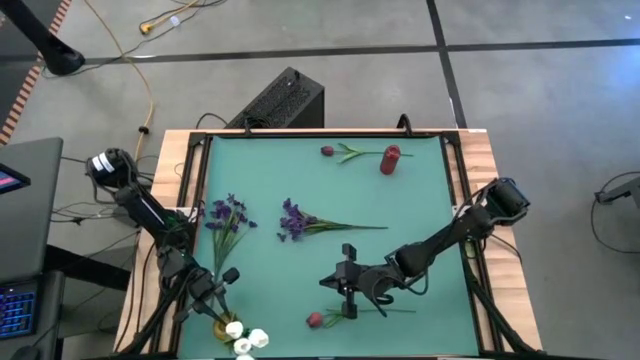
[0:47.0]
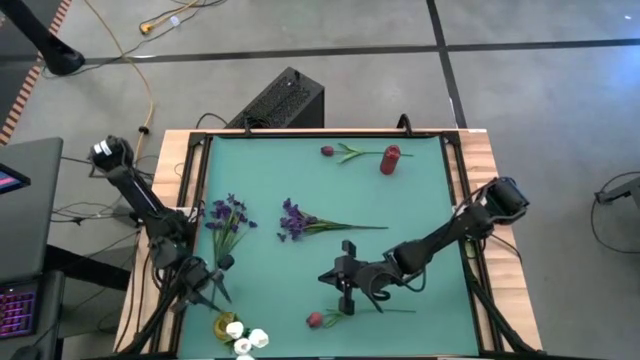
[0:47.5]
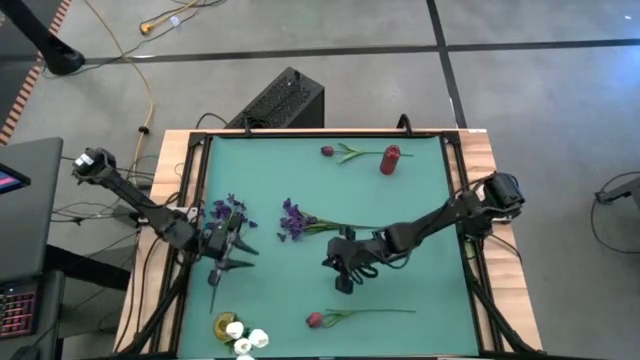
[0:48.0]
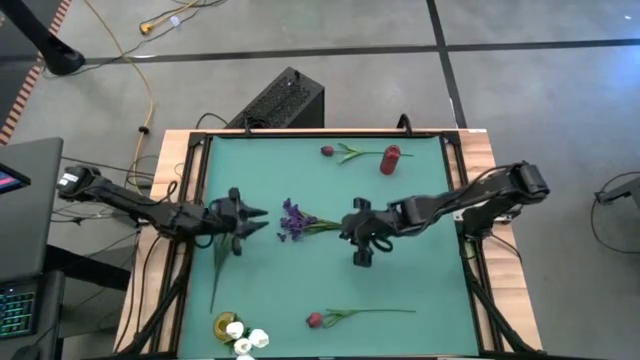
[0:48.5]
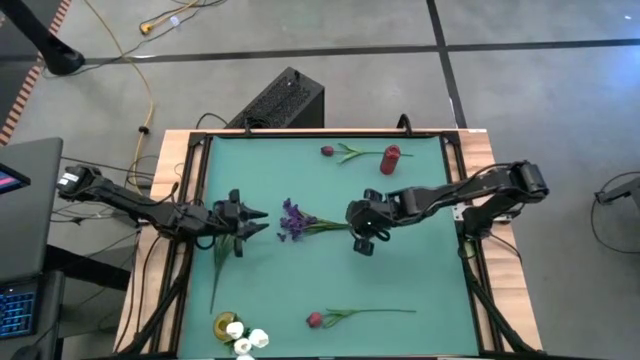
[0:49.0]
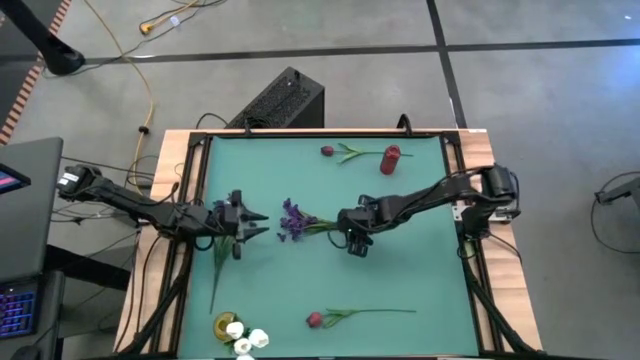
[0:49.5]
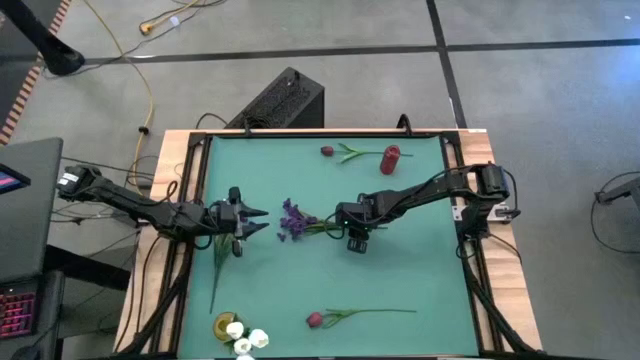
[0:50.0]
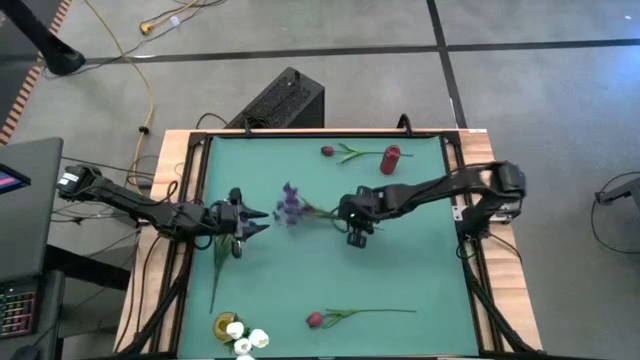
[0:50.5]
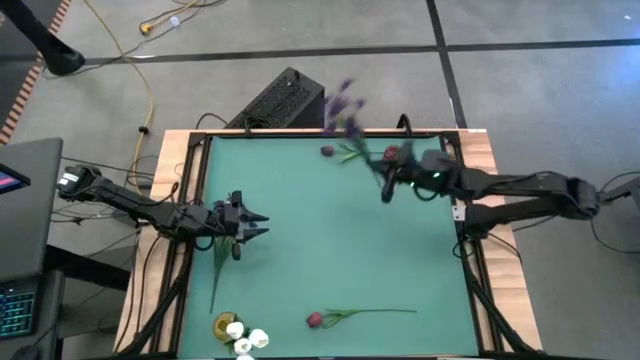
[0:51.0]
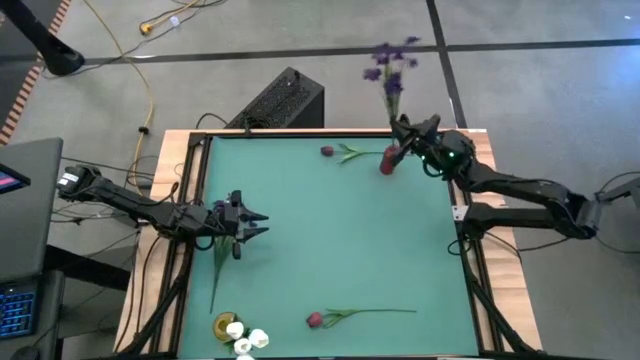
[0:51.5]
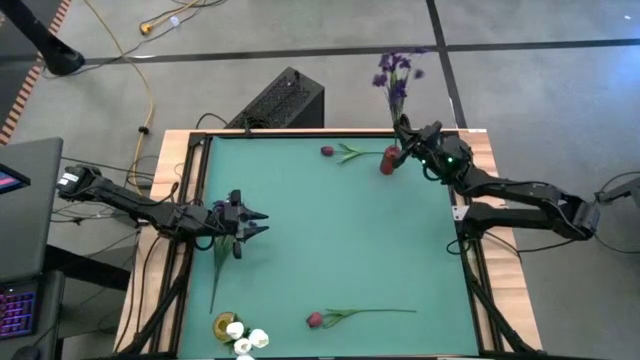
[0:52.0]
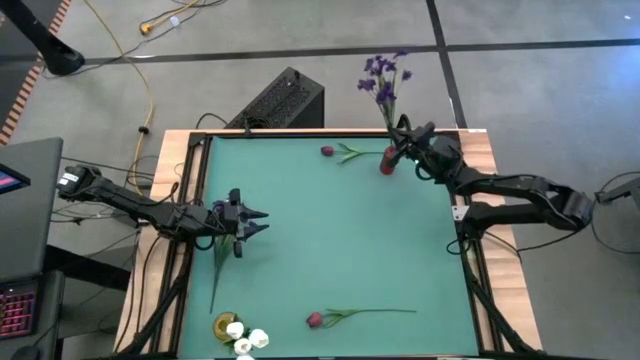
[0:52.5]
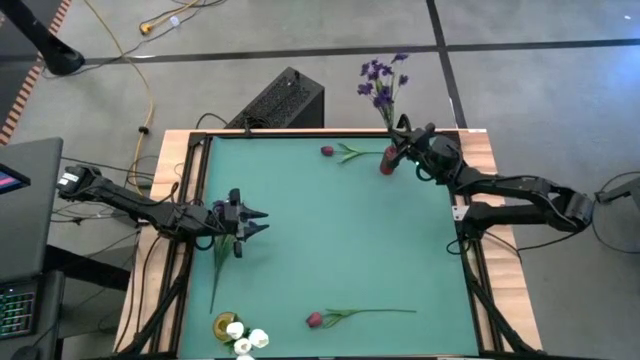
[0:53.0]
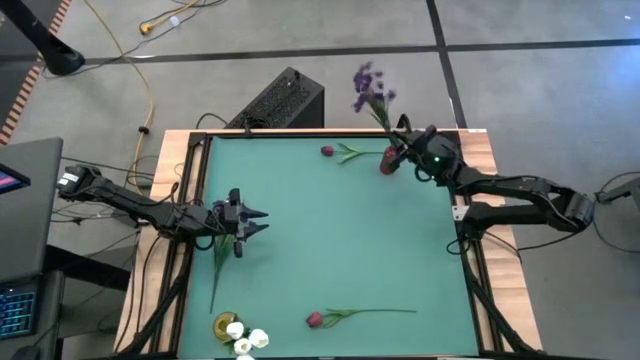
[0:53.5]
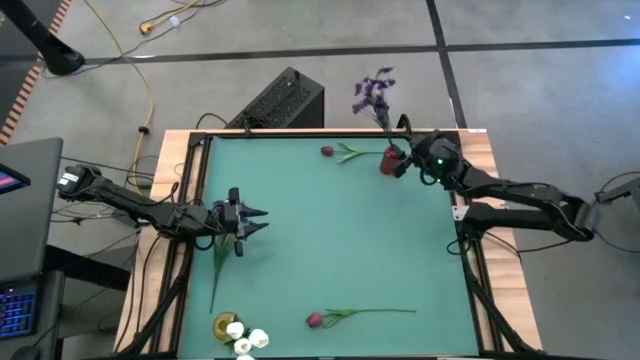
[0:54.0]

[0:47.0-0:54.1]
Task: Sort flowers into vase by color
Put the purple flowers into the red vase

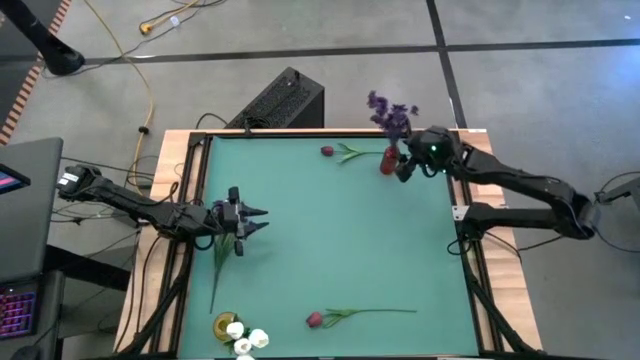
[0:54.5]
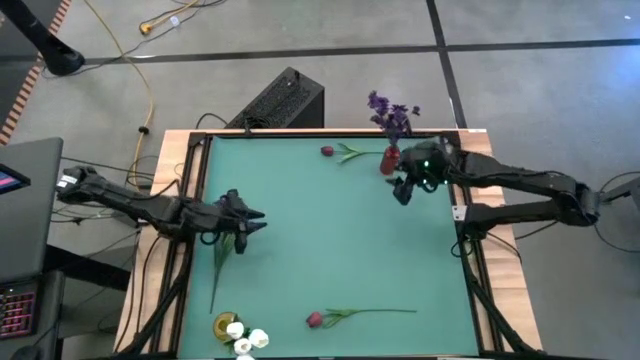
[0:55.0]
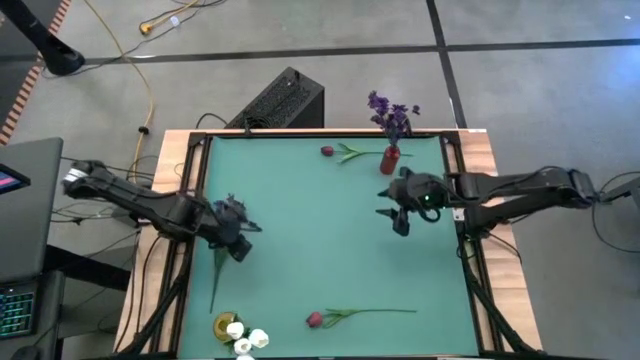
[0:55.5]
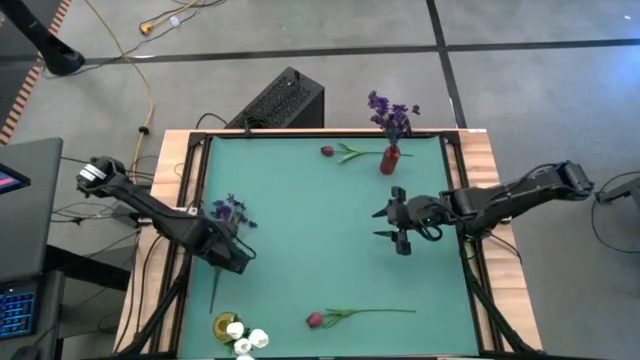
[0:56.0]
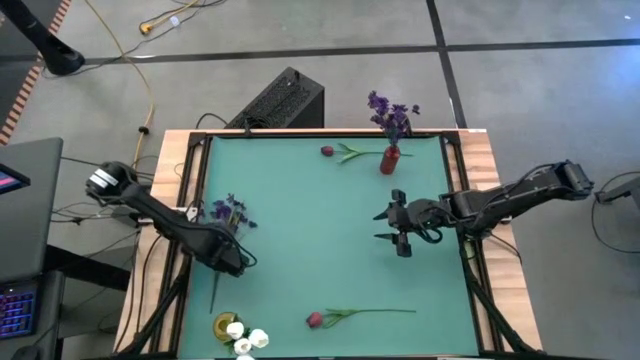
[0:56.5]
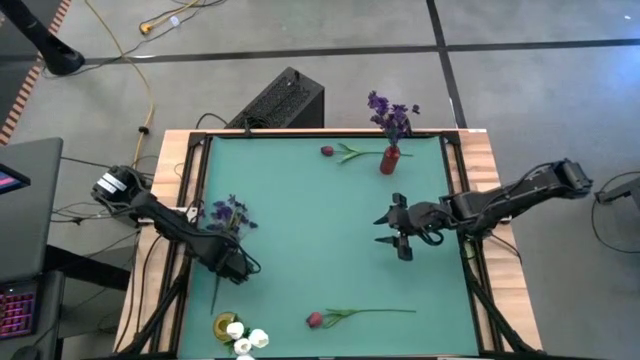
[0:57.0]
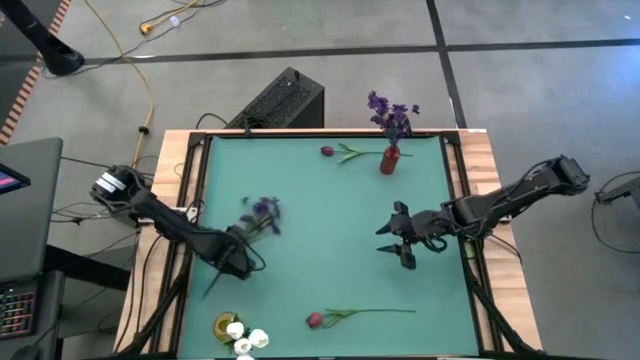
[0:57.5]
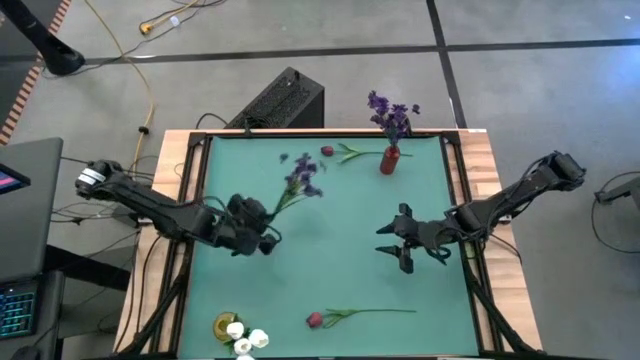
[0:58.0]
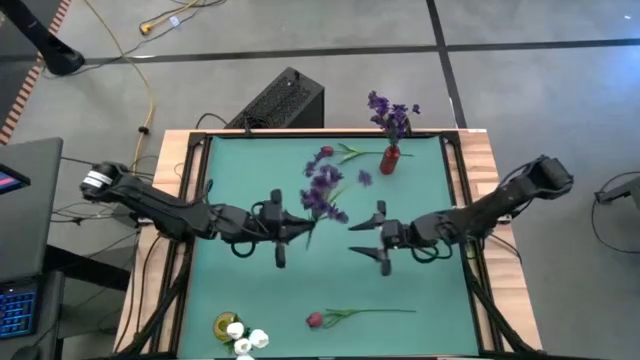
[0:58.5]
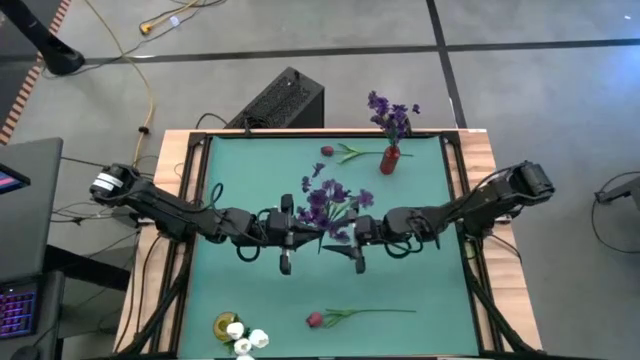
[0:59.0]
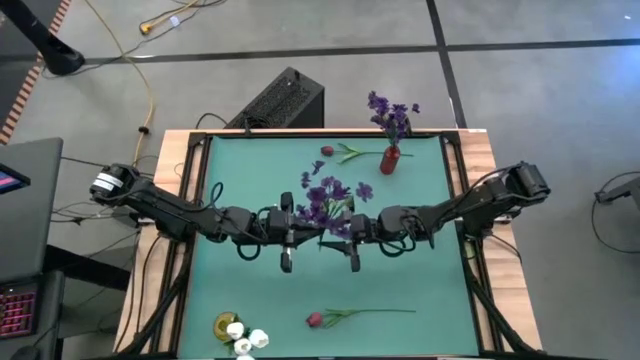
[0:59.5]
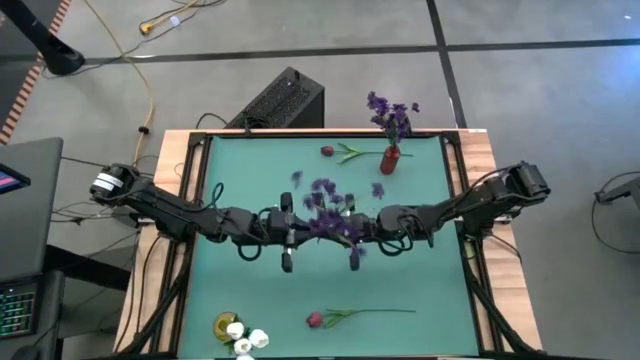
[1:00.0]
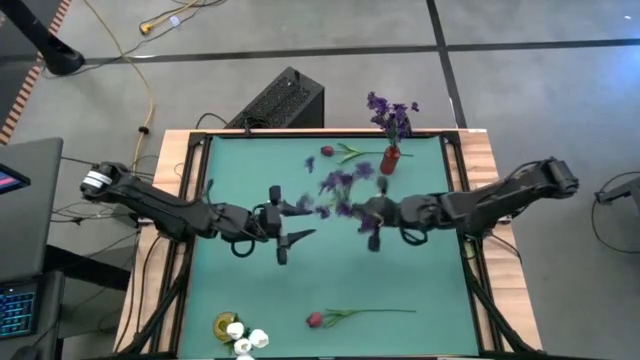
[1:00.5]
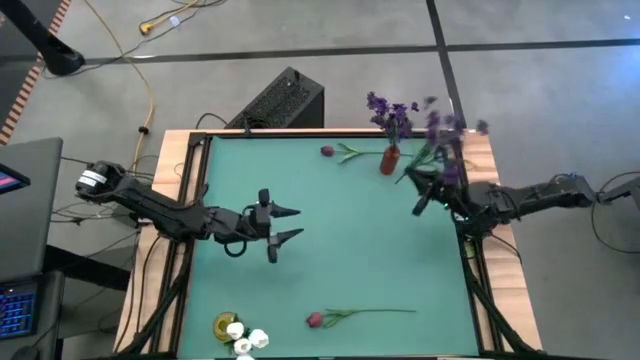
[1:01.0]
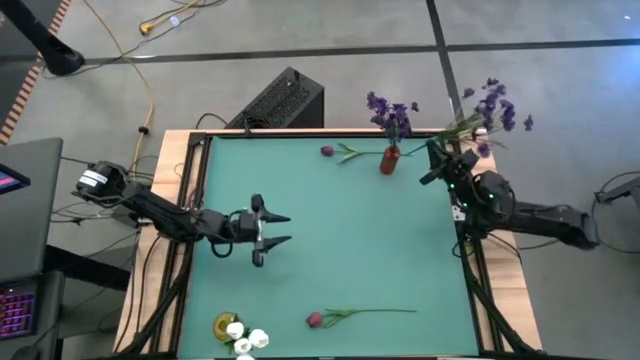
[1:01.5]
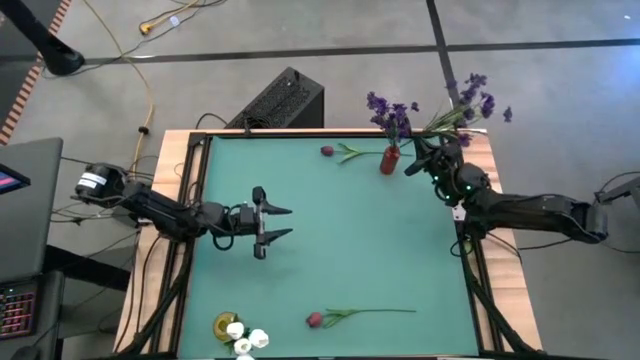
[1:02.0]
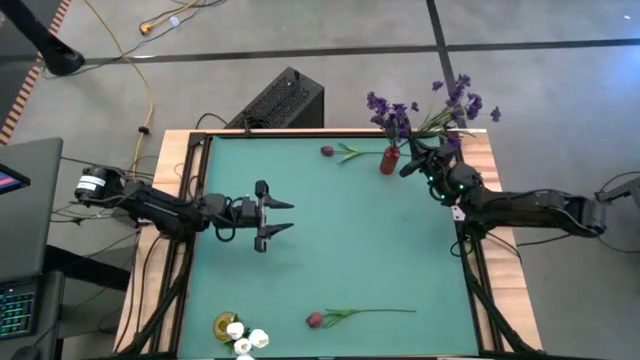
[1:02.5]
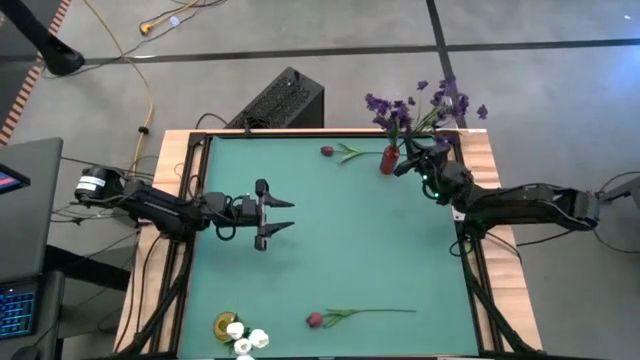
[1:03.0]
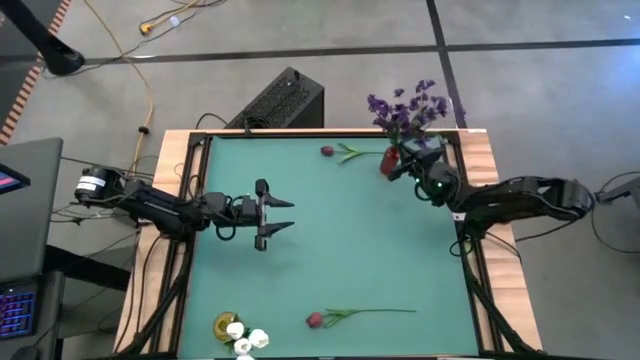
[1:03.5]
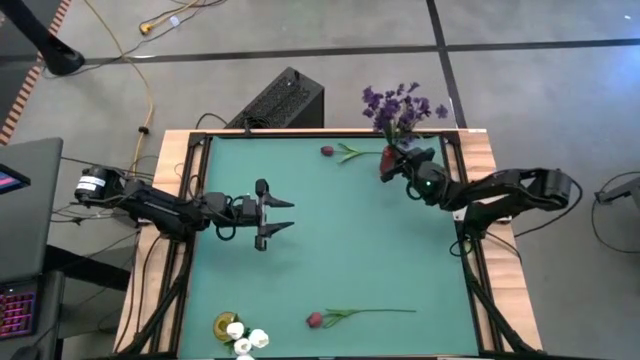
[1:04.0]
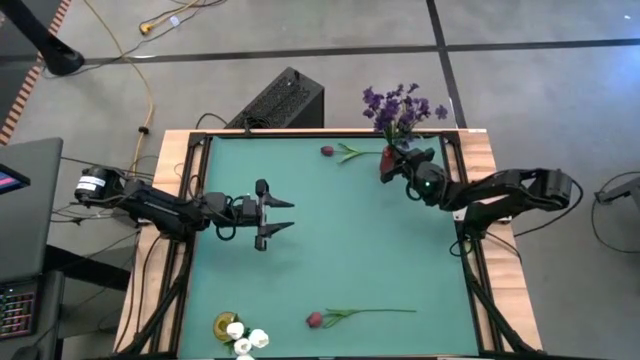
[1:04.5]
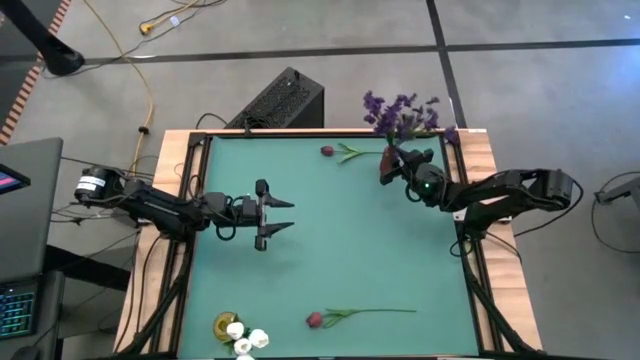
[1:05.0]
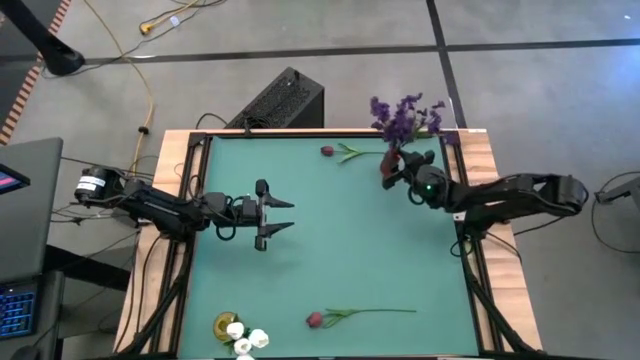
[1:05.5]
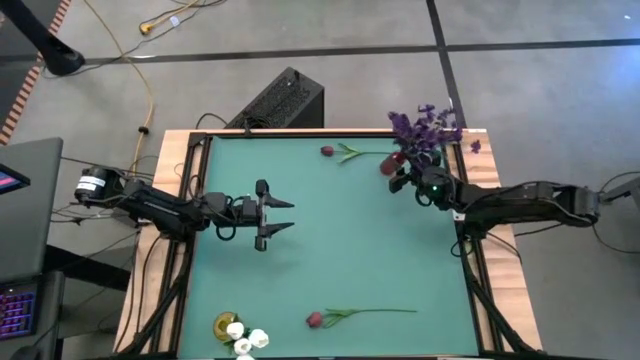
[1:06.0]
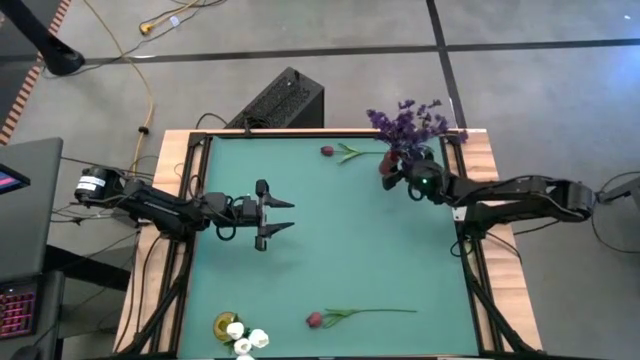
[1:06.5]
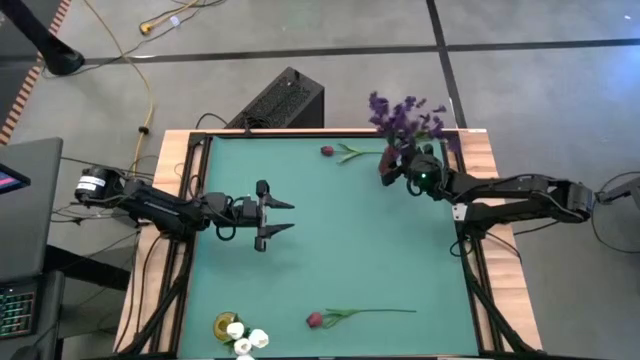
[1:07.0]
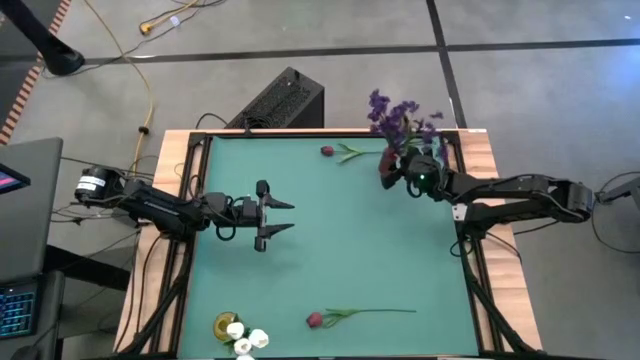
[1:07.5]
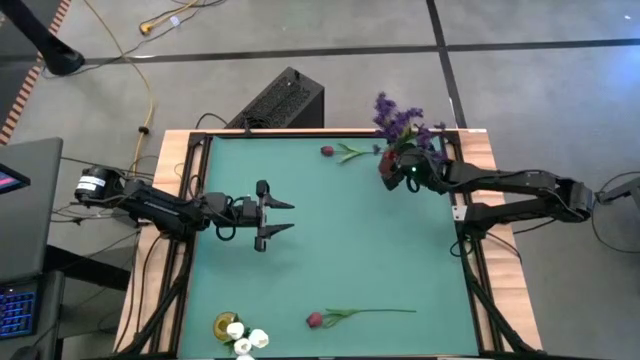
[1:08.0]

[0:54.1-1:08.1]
Put the purple flowers into the red vase
